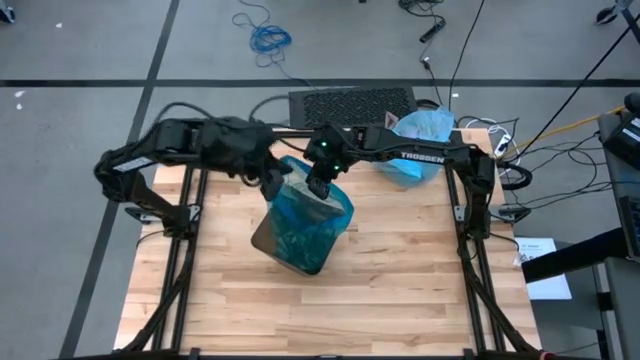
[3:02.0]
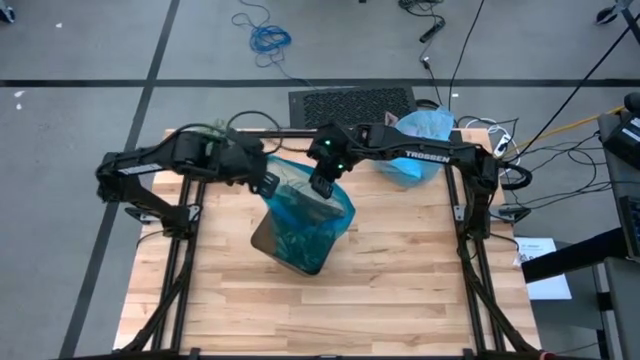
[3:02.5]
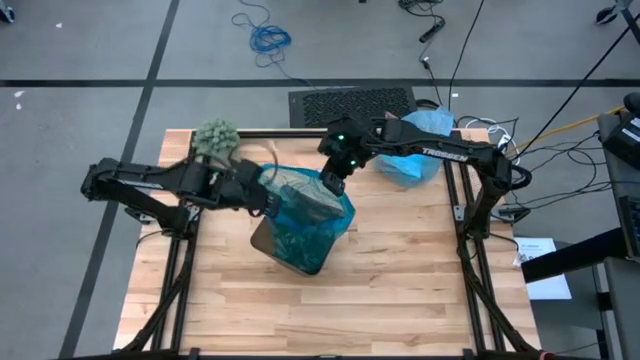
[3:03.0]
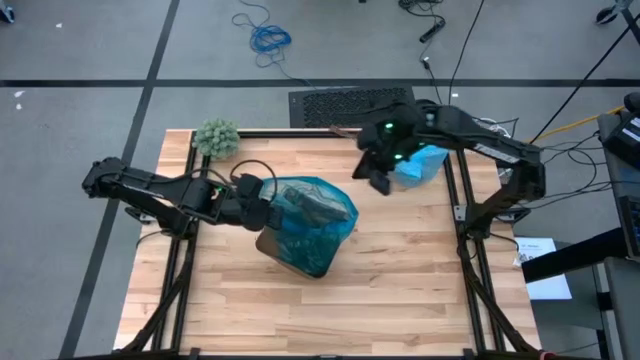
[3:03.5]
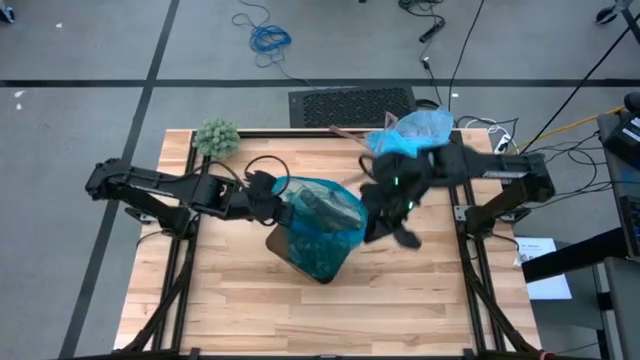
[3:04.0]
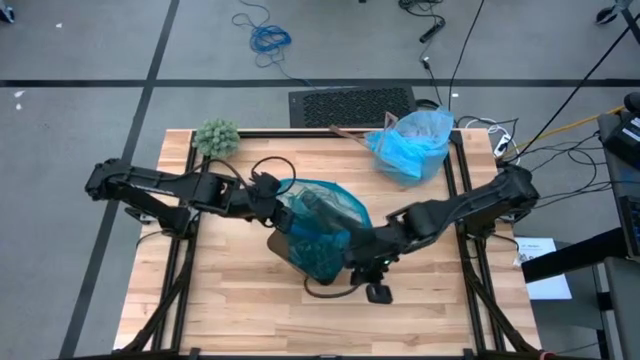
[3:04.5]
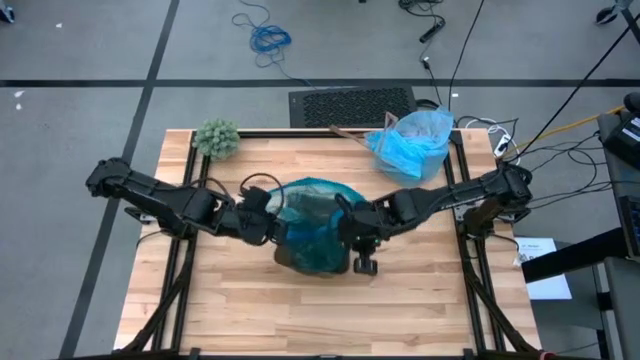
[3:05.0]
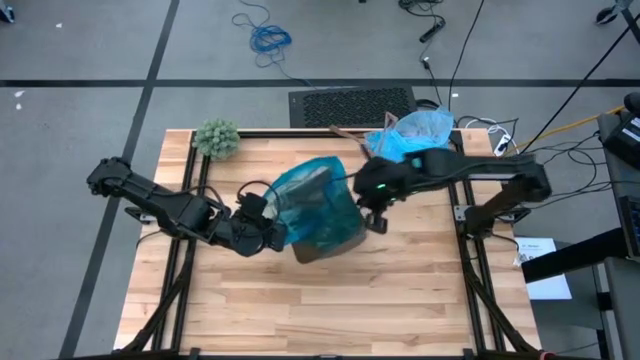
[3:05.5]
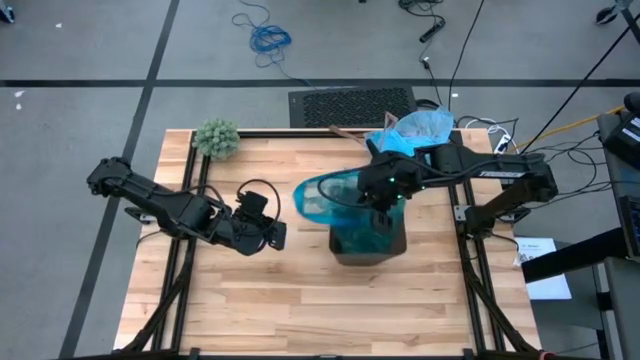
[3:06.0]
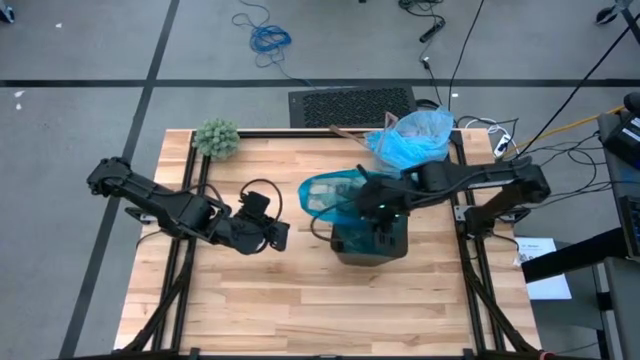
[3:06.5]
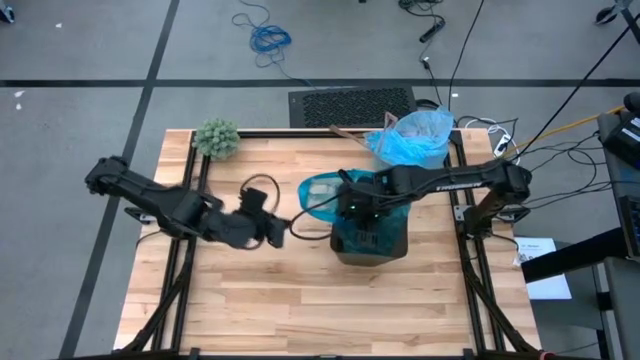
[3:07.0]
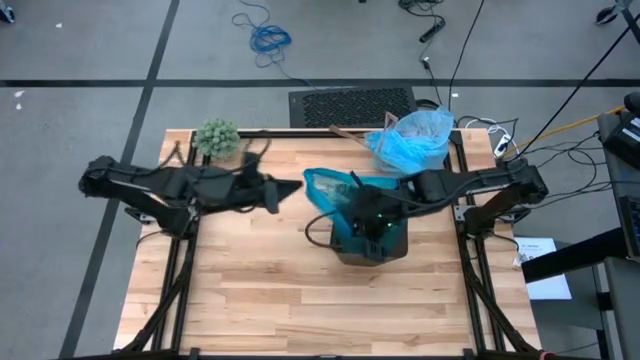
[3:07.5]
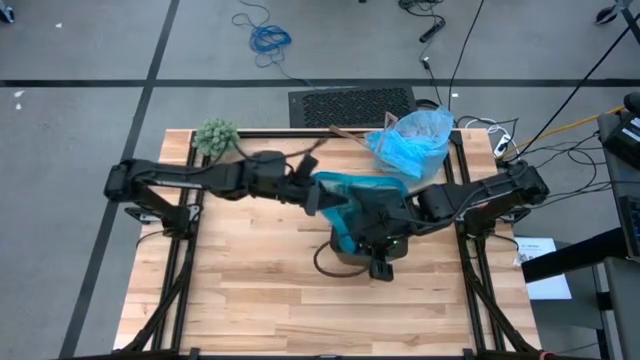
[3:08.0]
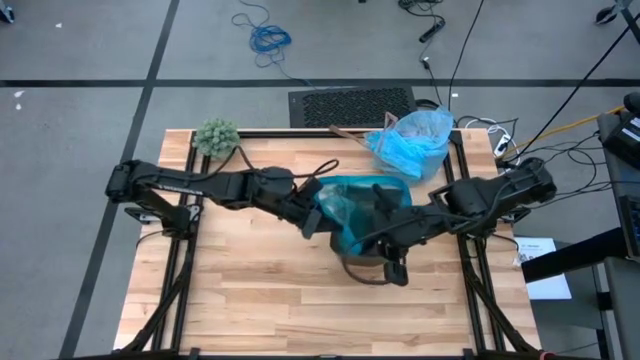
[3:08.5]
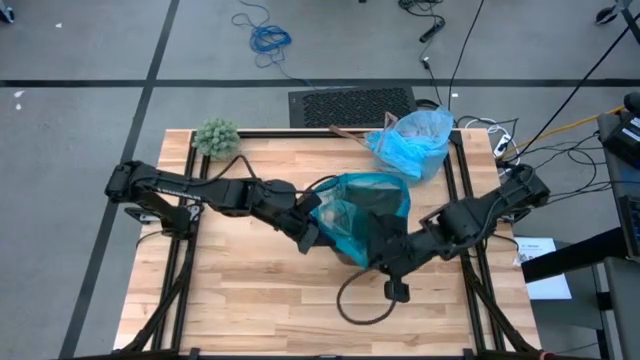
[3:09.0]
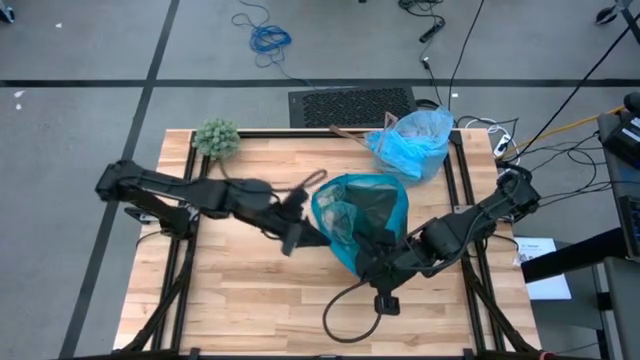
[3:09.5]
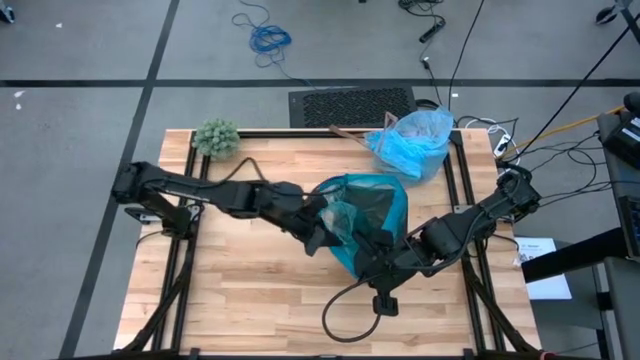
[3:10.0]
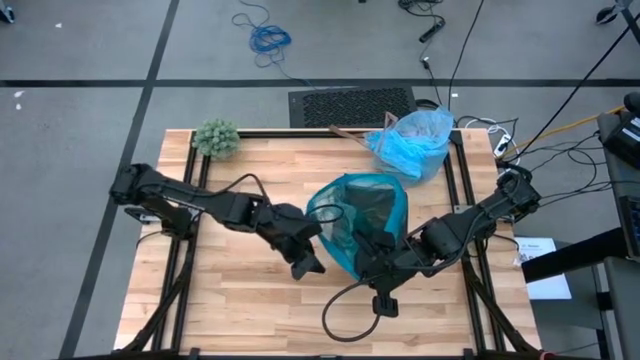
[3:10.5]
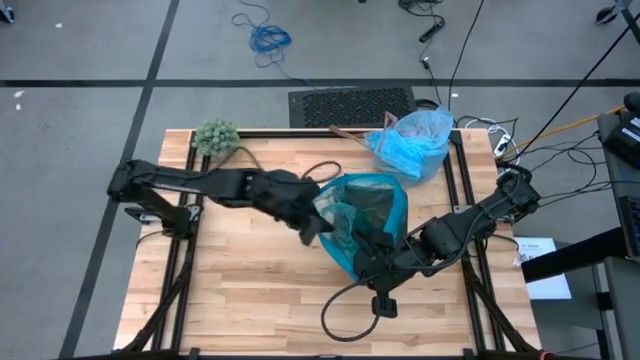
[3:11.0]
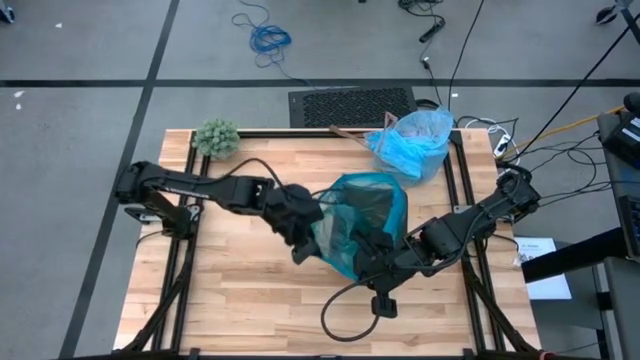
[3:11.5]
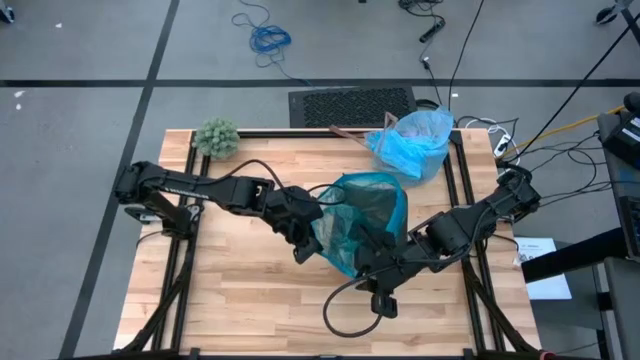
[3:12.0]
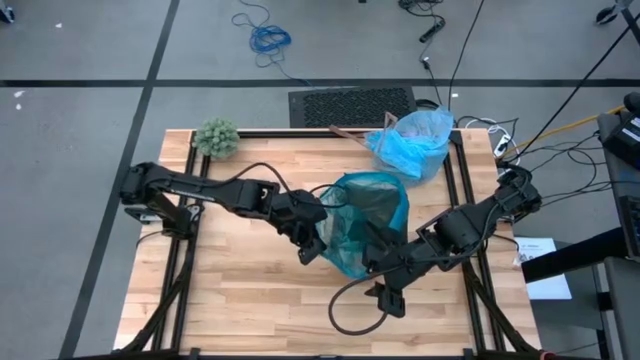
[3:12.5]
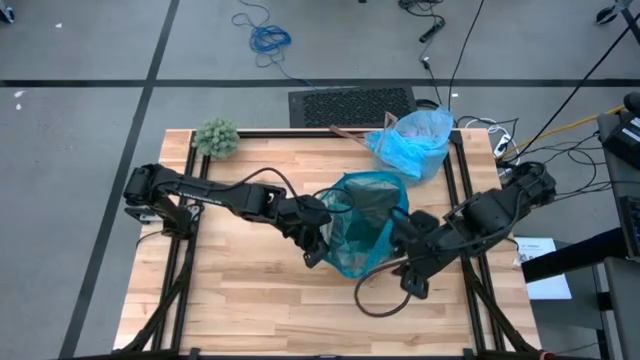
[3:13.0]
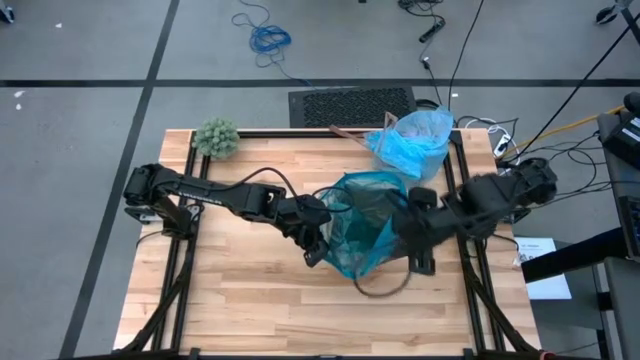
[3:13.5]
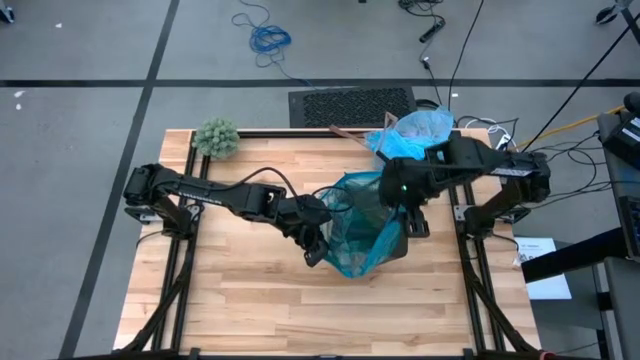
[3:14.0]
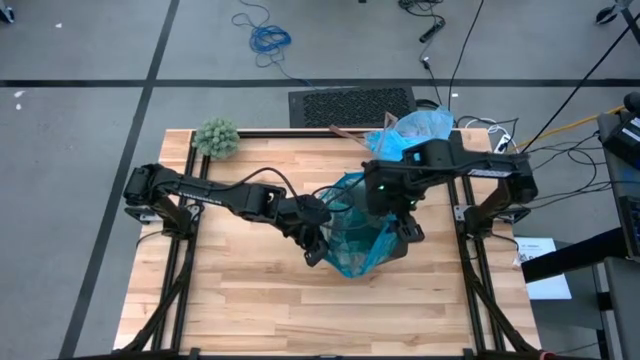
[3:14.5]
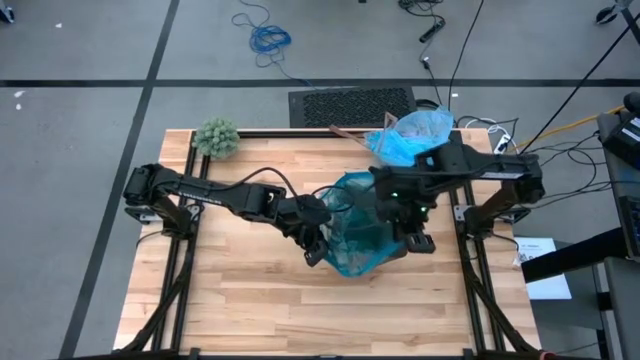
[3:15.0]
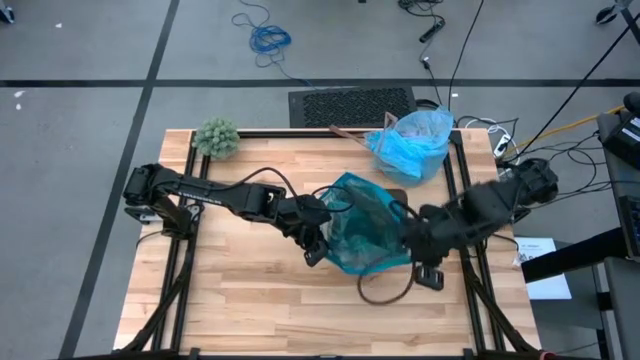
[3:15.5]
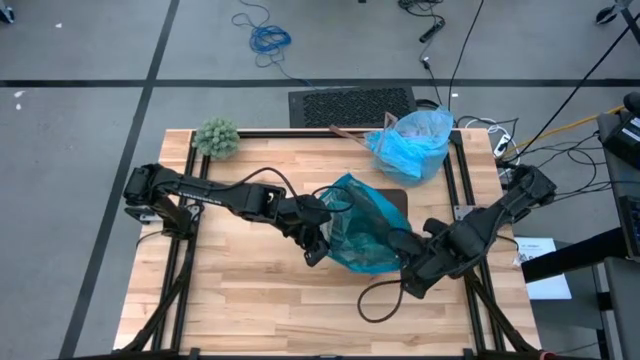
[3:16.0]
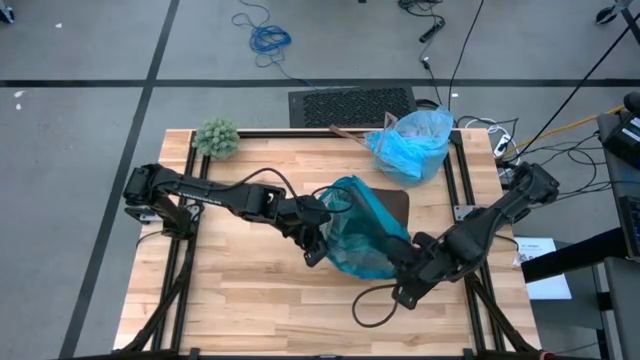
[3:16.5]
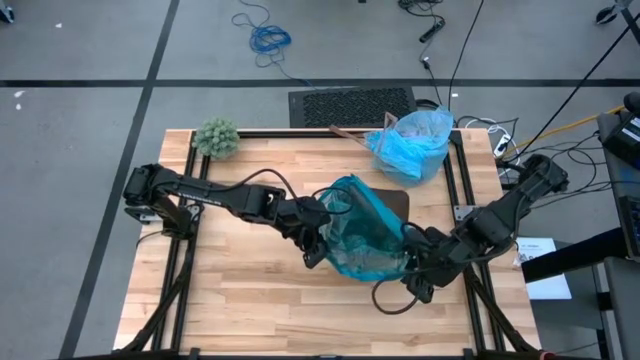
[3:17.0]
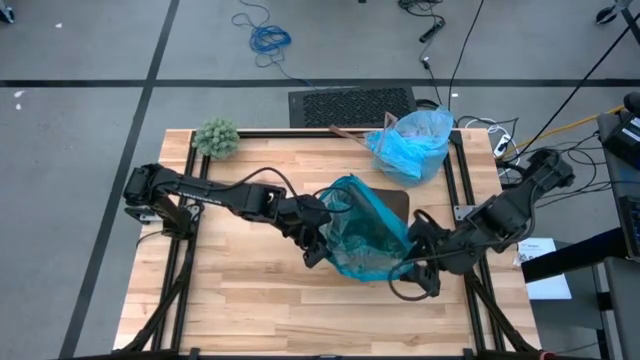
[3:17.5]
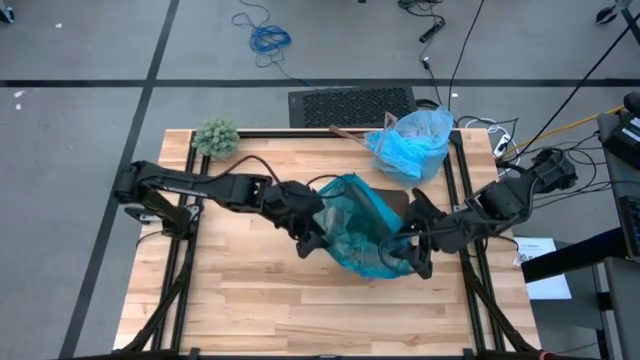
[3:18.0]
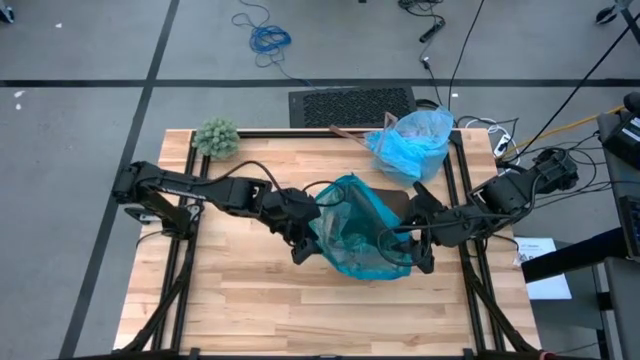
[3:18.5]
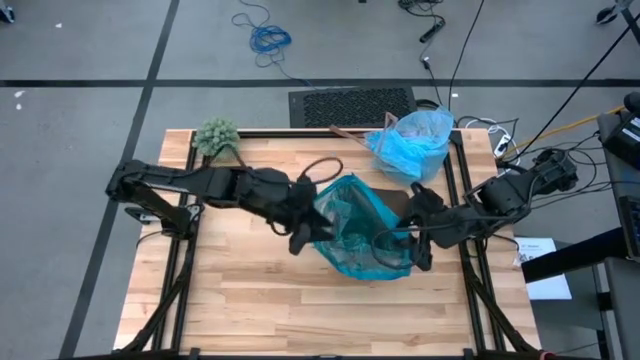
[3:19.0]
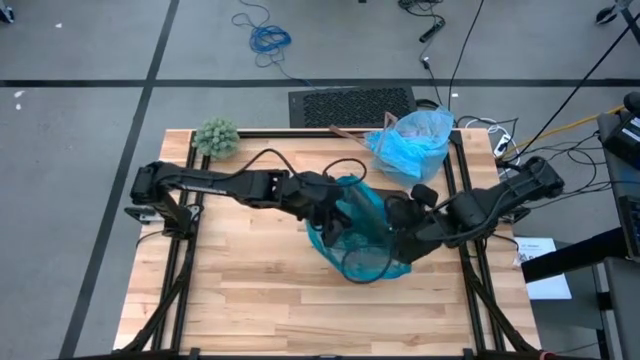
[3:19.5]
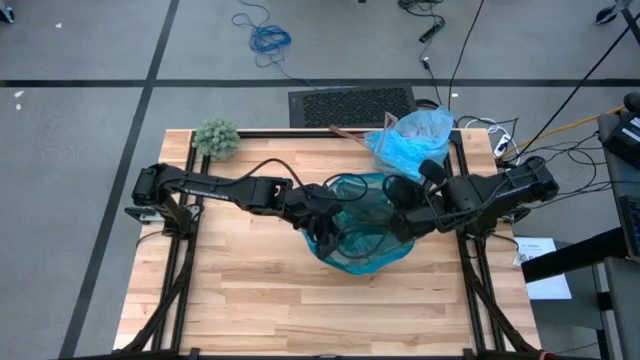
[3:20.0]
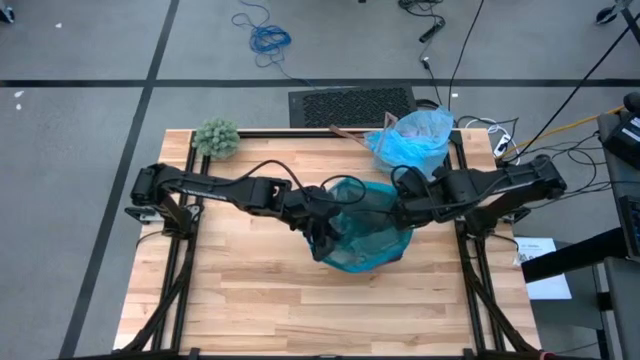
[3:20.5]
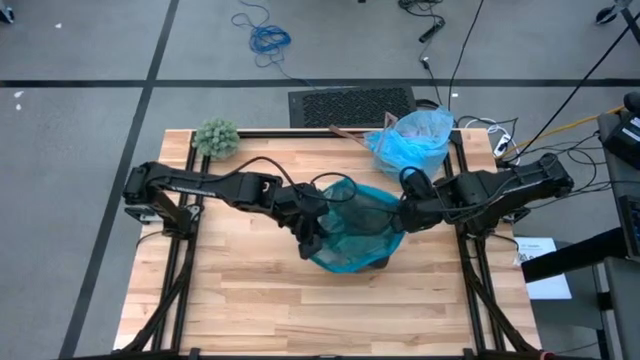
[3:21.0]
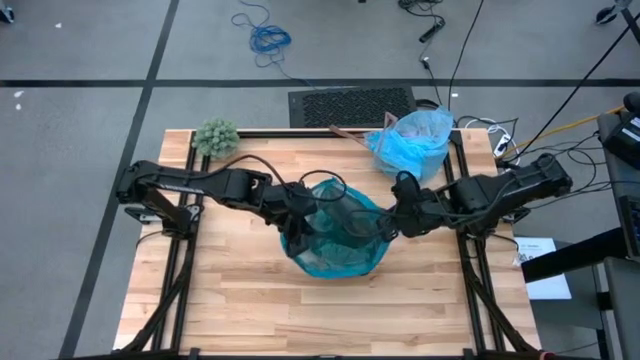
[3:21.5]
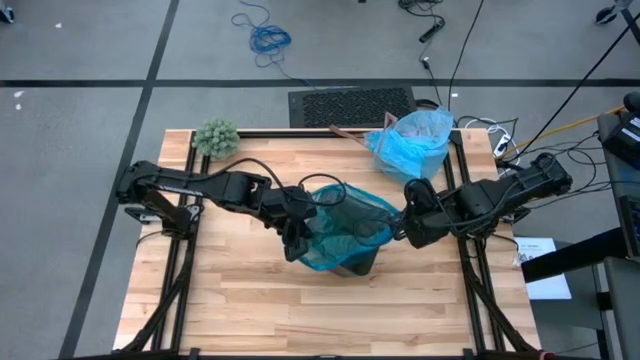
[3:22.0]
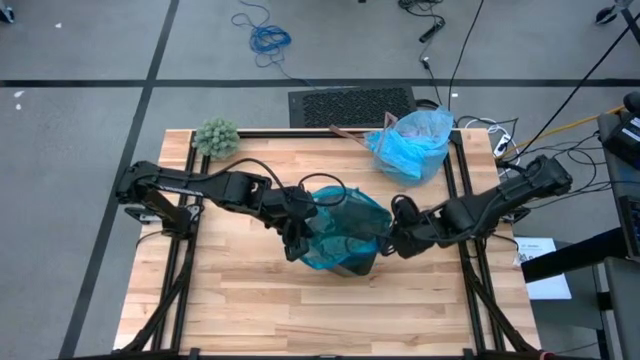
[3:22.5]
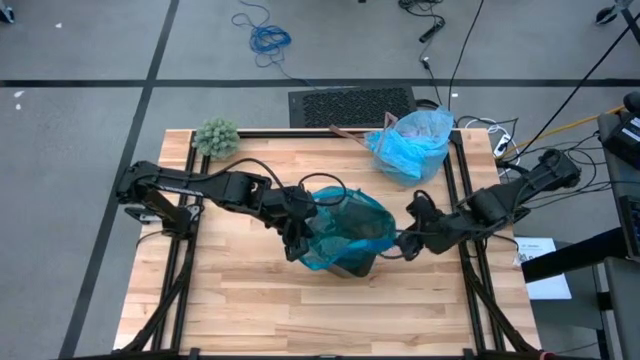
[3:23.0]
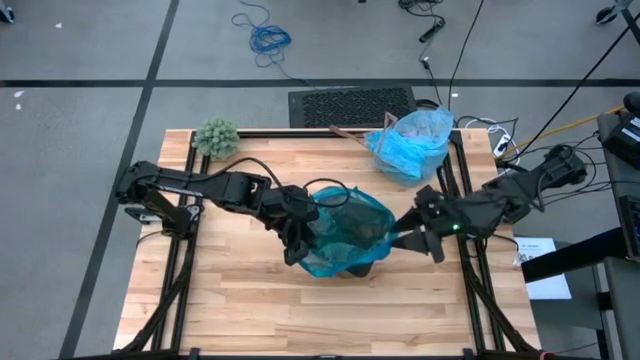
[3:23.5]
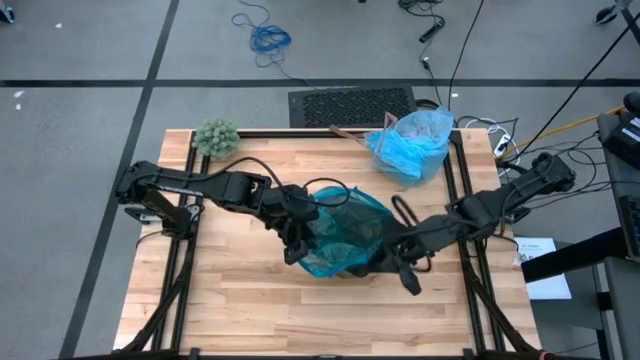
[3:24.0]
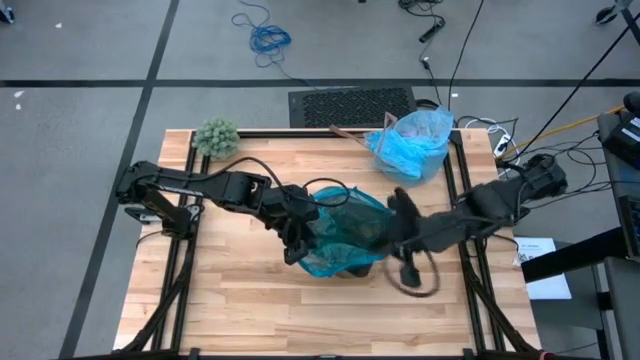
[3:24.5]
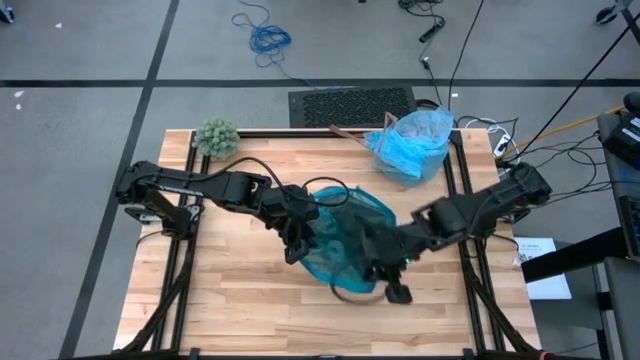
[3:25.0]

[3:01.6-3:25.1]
Task: place trash/remove bag and relplace
Insert the bottom blue trash bag into the trash bin
